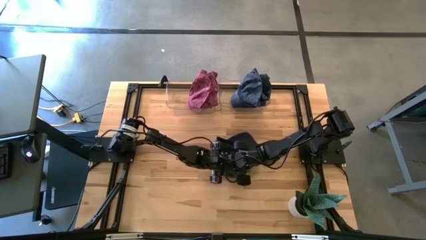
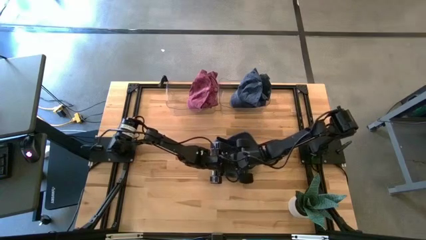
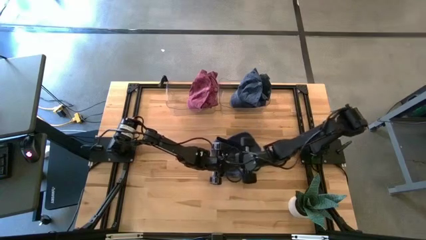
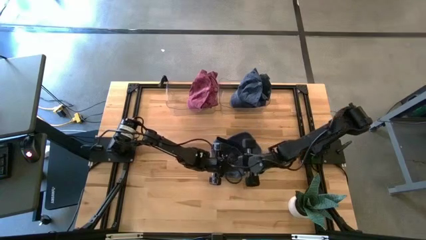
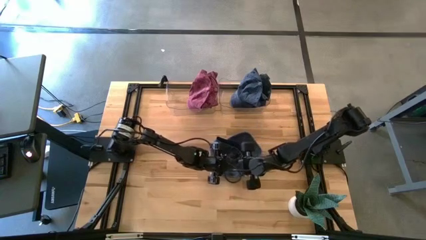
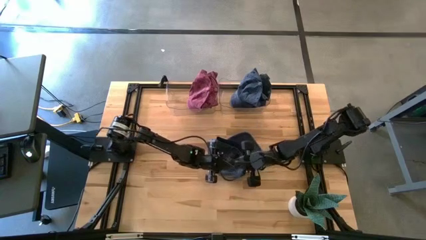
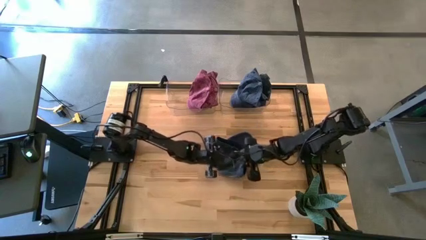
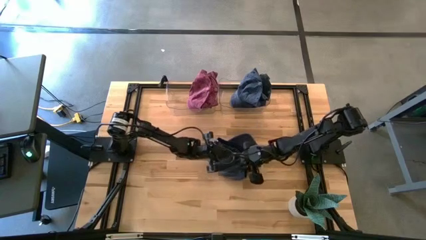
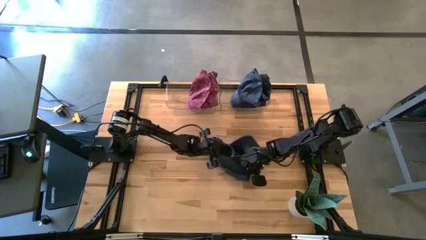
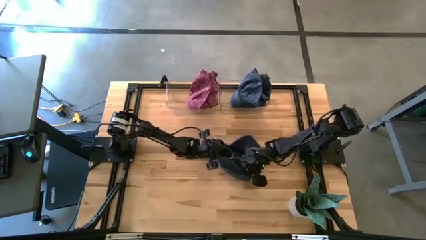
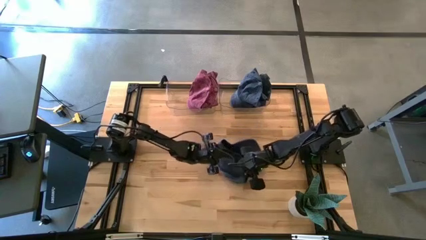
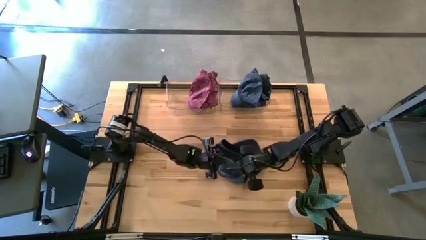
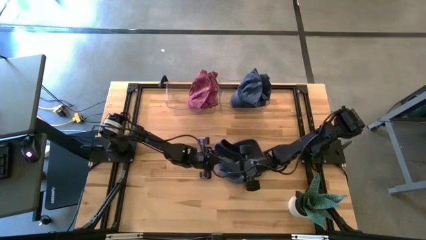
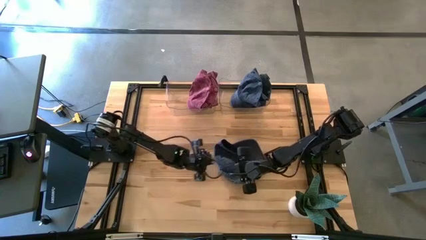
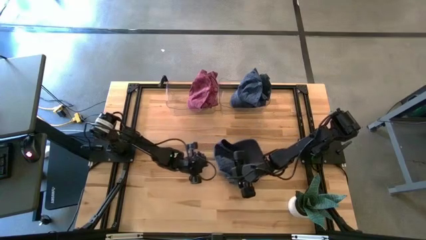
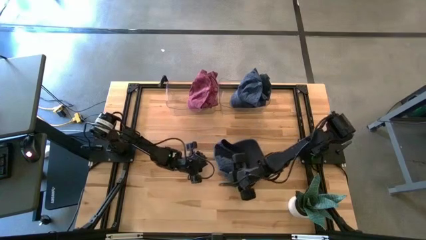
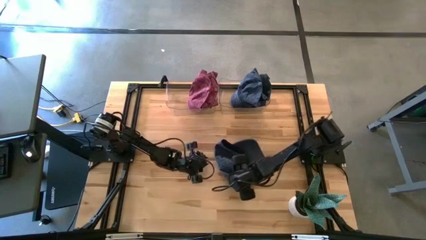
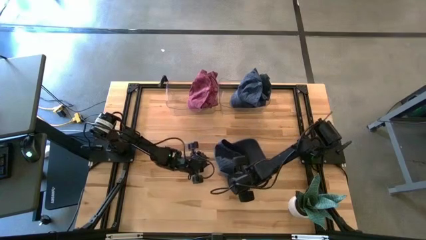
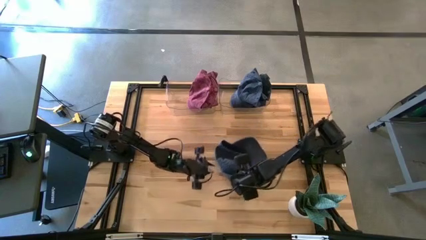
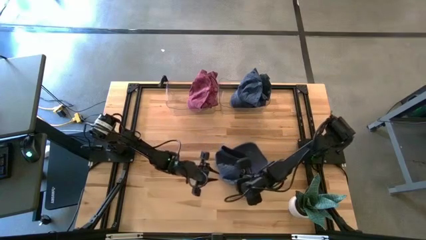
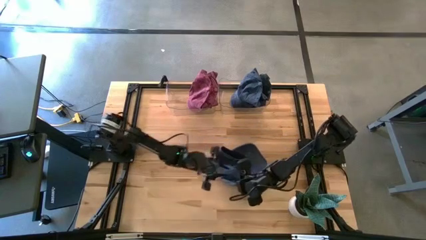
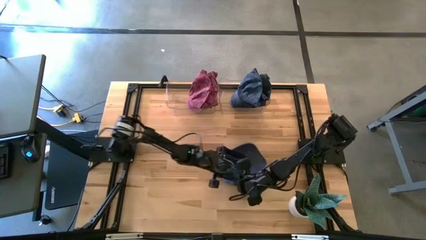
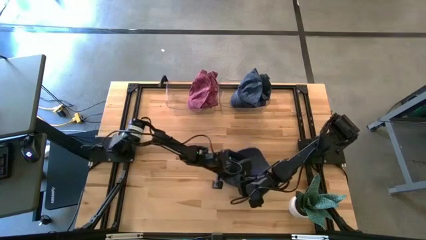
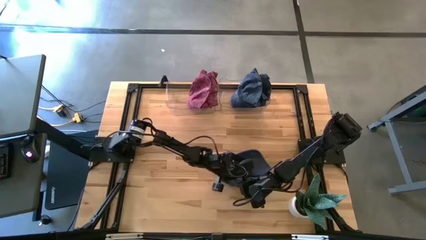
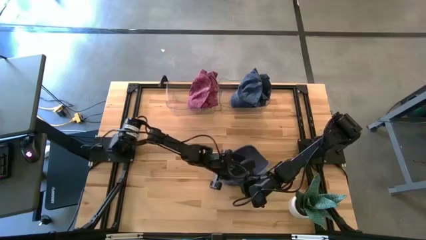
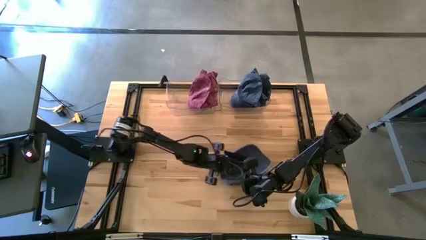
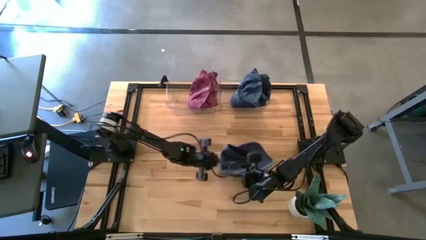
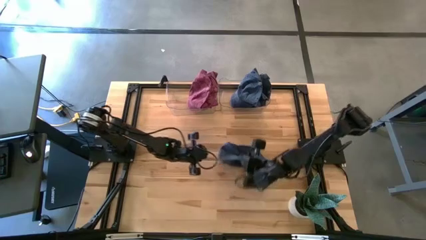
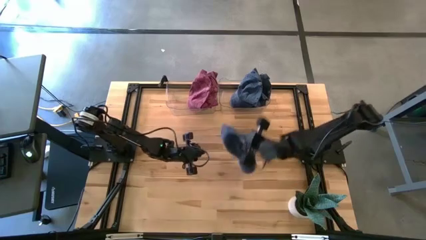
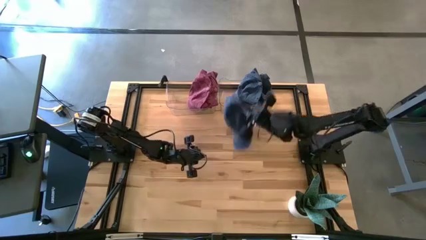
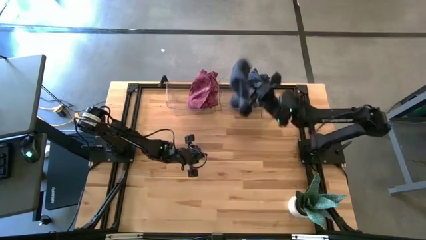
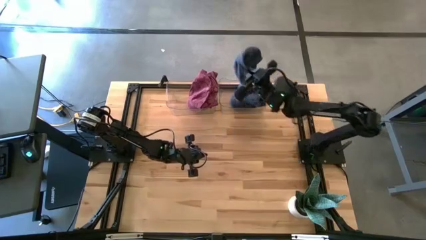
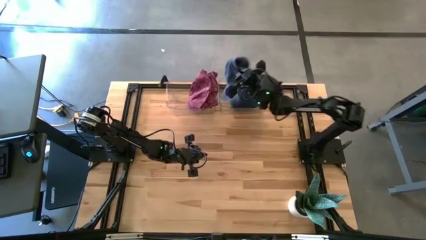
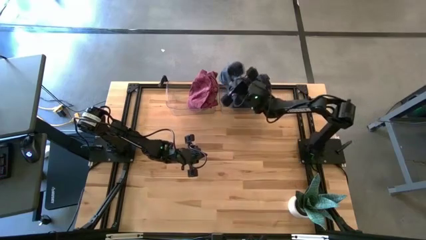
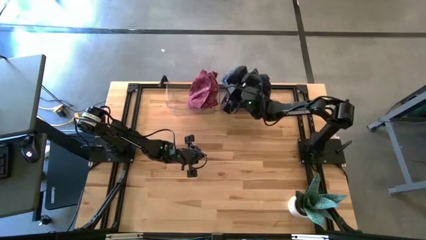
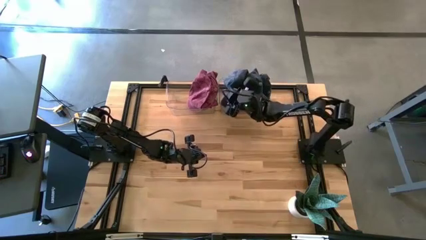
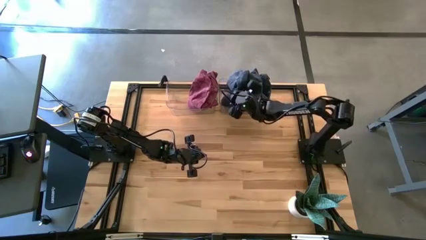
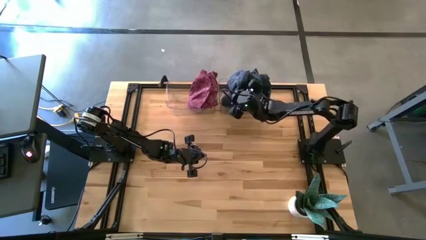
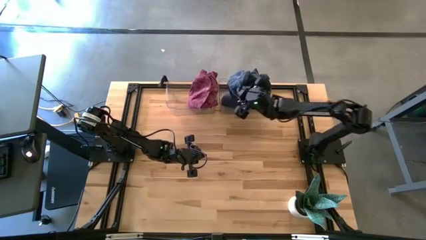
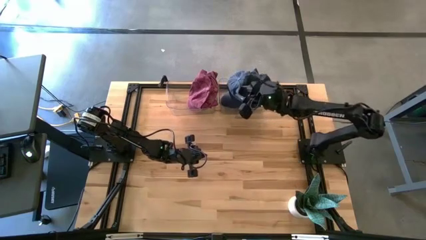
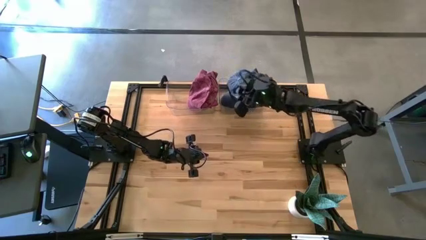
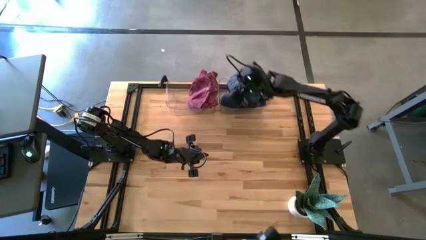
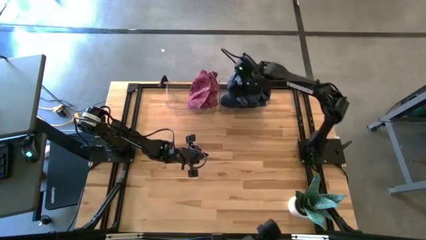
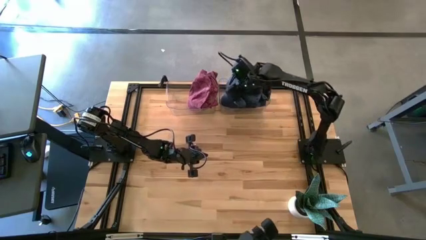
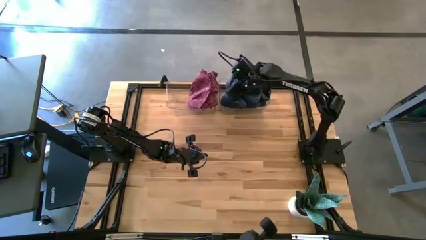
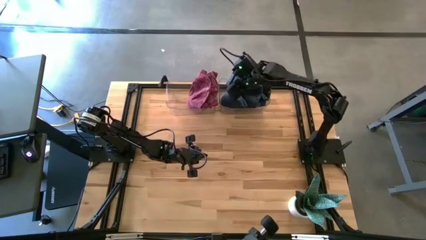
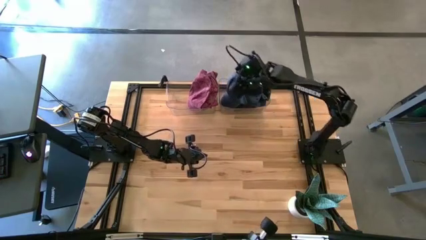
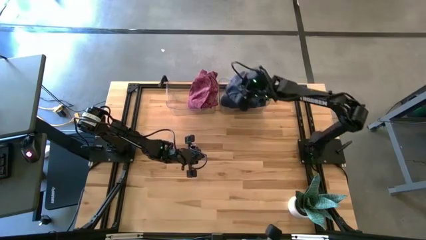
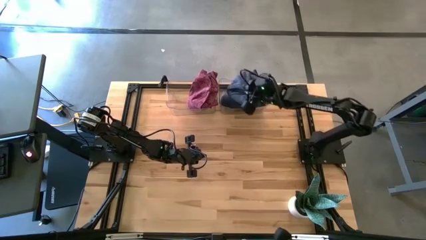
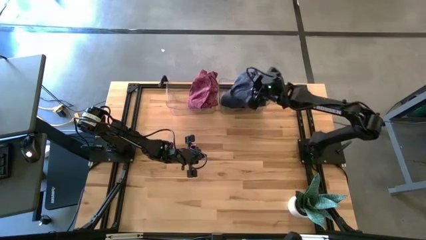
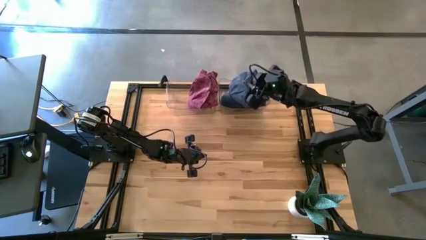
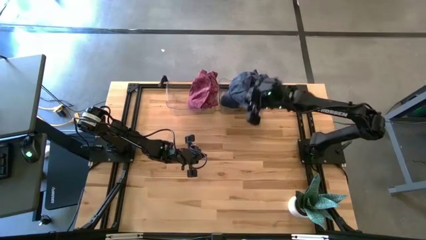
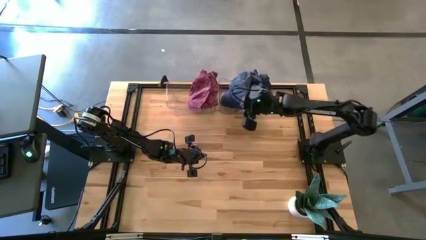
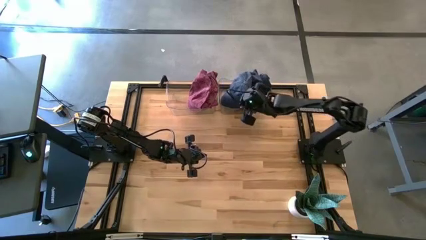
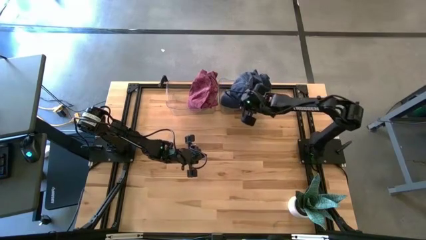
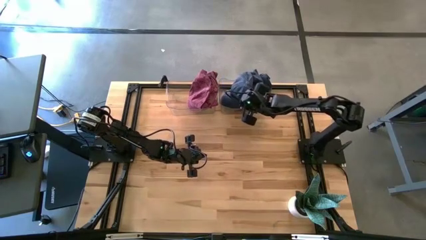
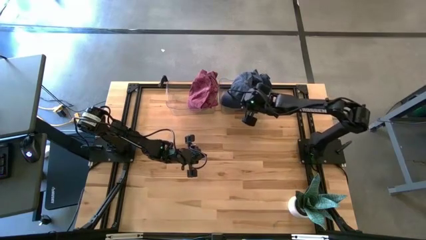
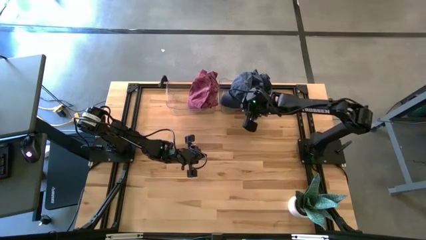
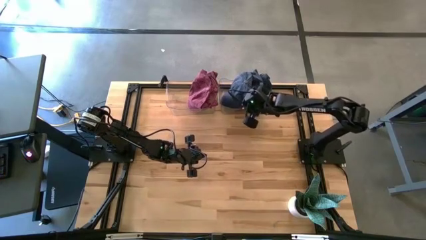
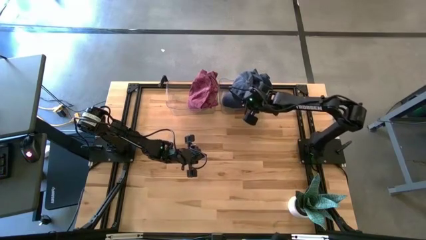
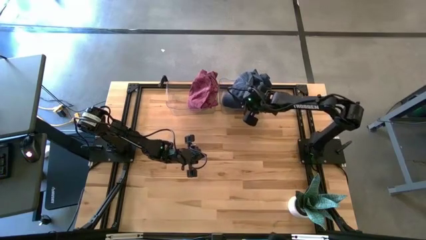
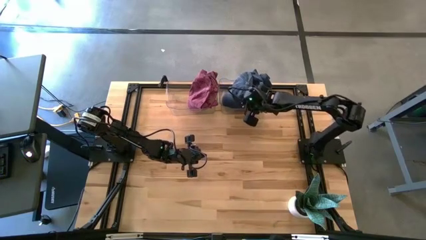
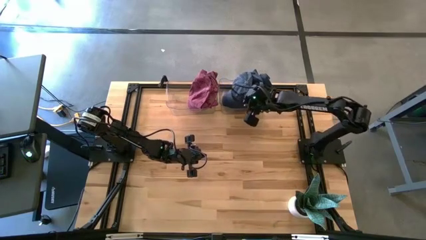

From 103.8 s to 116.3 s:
Task: Pick & Place hat
Put the blue cap into the right transparent bin

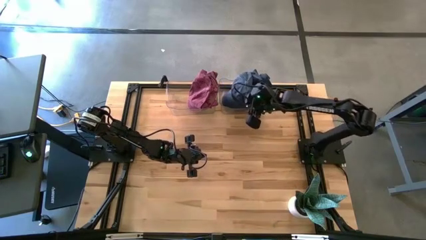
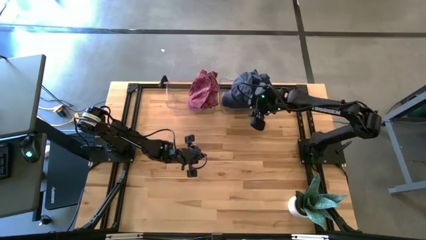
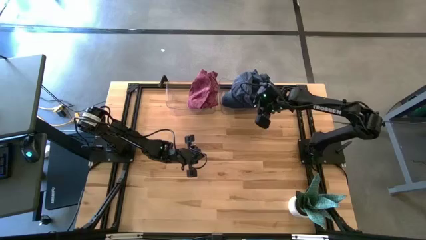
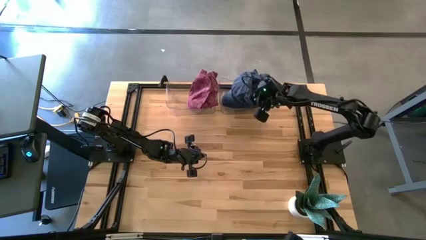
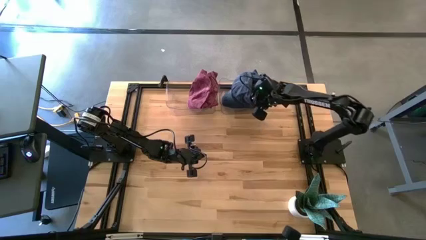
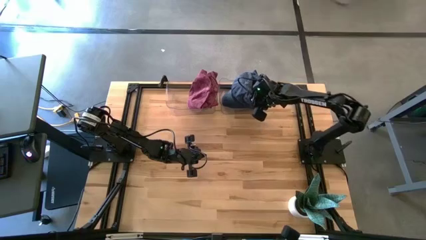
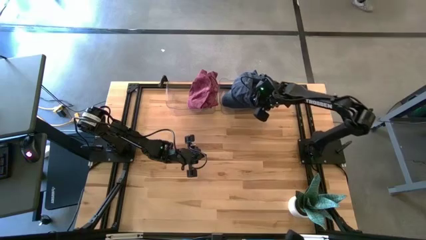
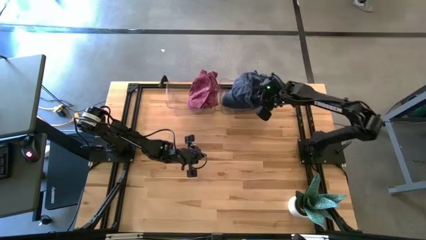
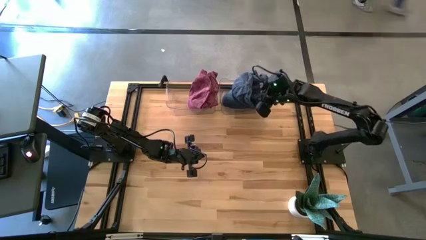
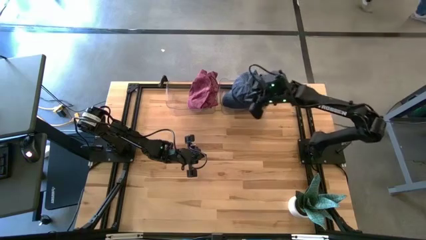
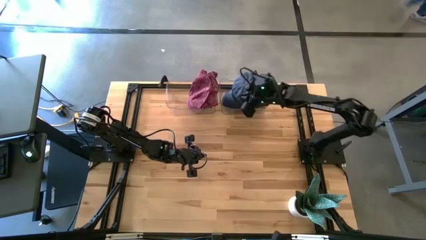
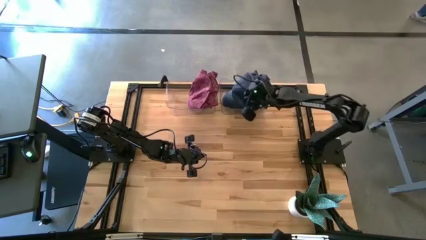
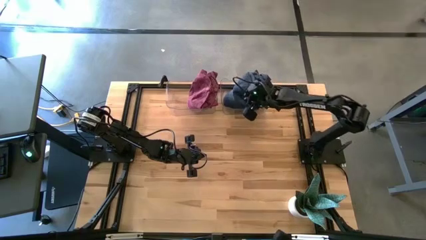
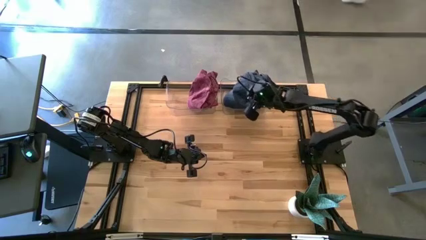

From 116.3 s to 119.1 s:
Adjust the blue caps in the right transparent bin

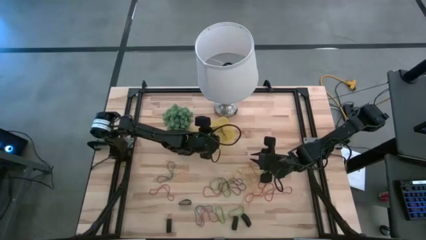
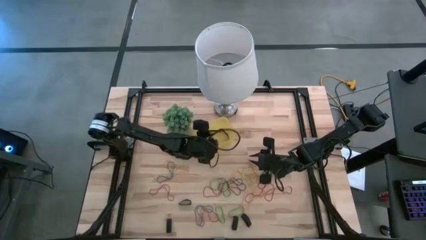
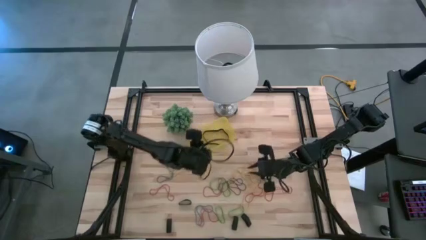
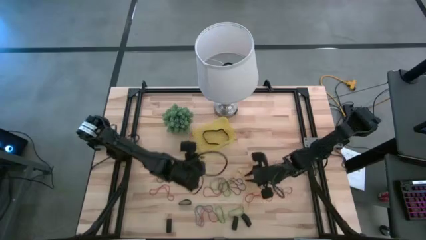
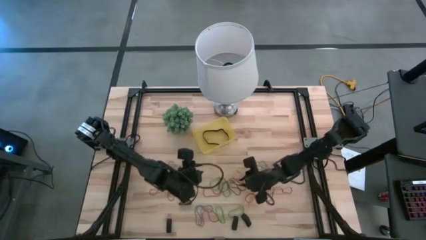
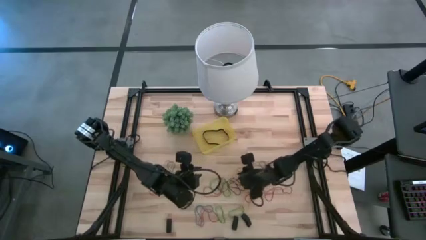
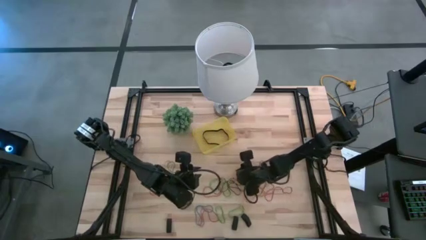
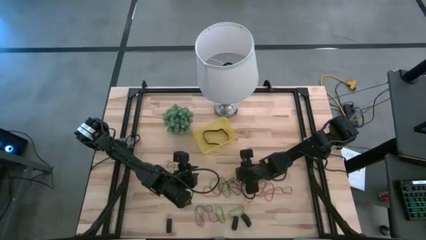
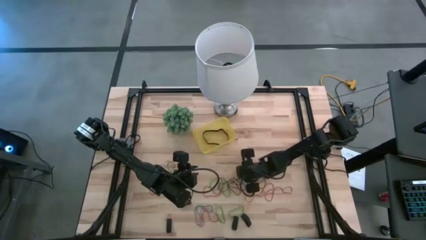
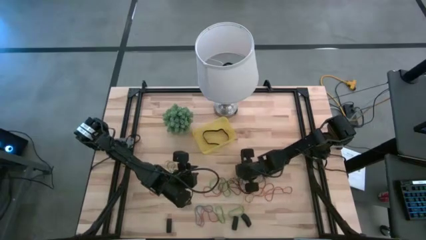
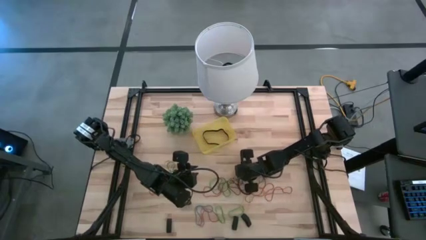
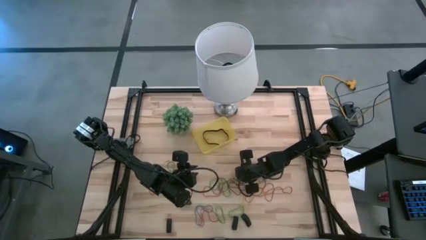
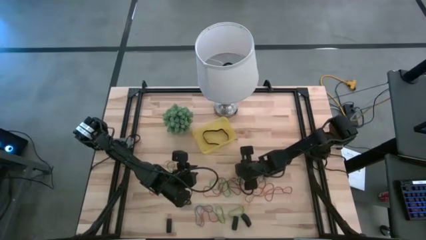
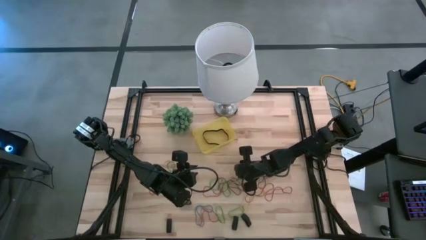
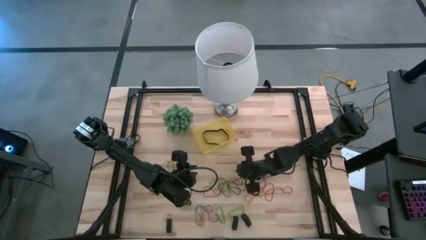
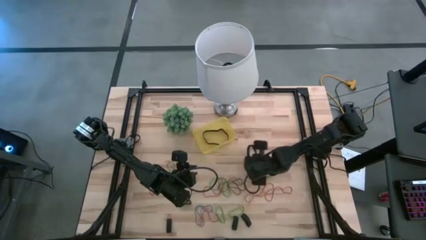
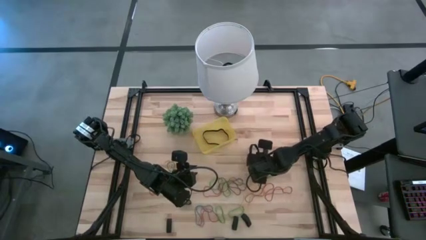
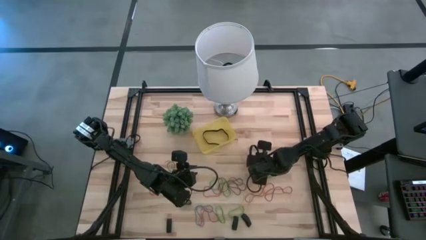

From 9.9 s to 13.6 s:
Task: Pick and place rubber bands into bin
Put the yellow rubber band into the yellow bin
